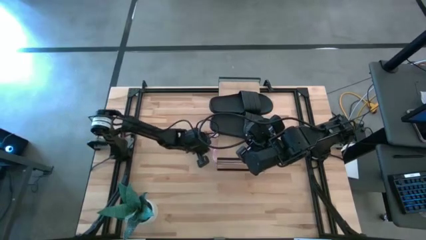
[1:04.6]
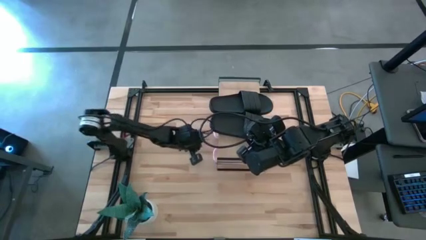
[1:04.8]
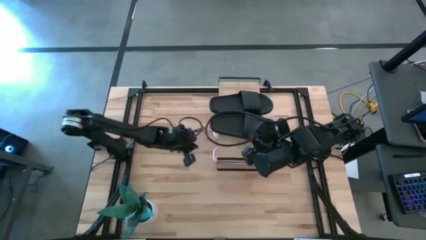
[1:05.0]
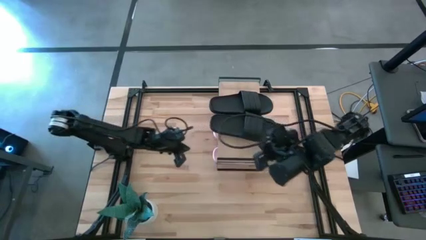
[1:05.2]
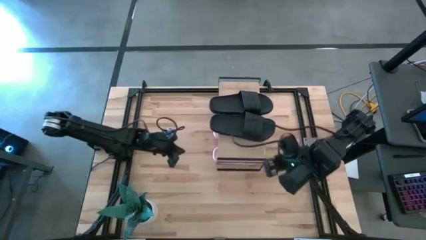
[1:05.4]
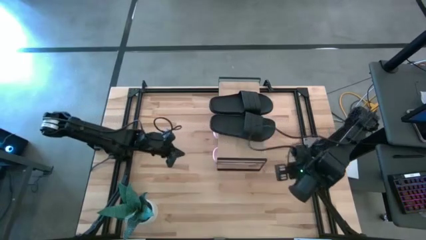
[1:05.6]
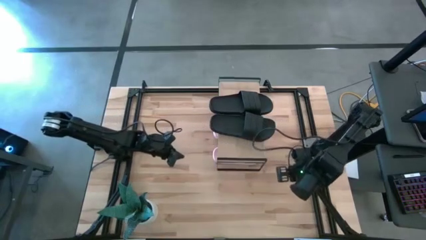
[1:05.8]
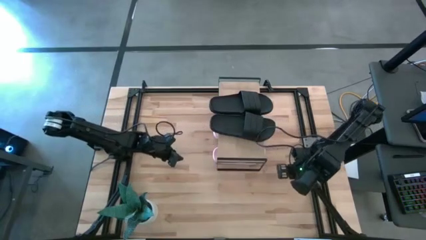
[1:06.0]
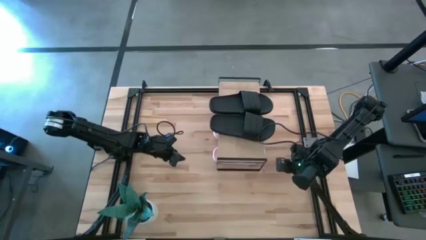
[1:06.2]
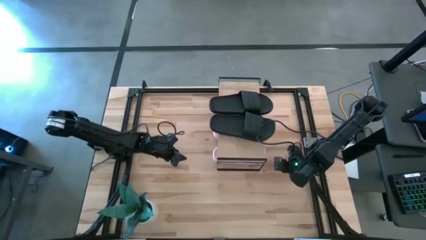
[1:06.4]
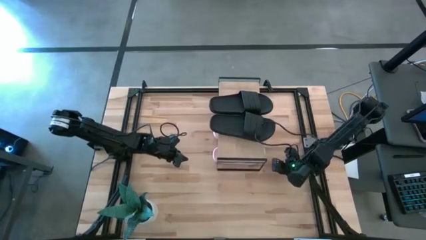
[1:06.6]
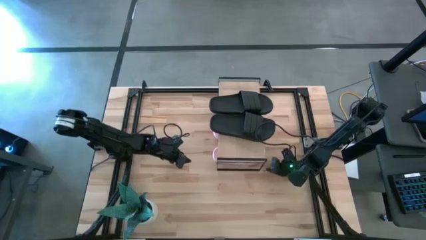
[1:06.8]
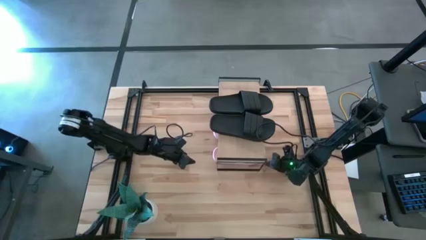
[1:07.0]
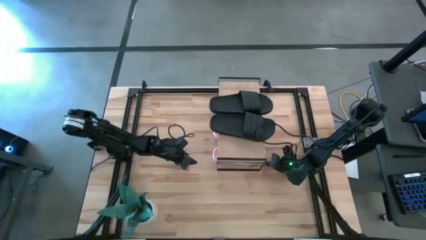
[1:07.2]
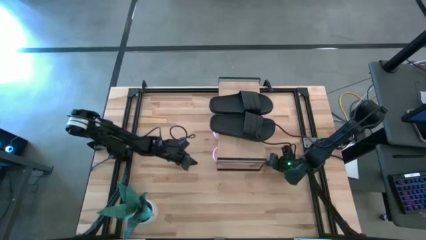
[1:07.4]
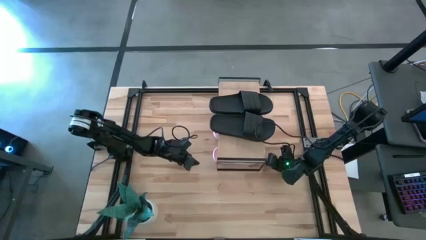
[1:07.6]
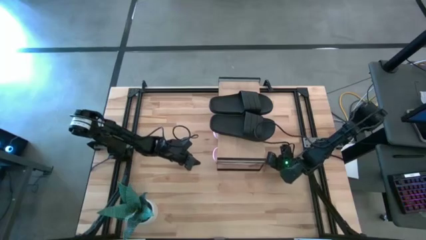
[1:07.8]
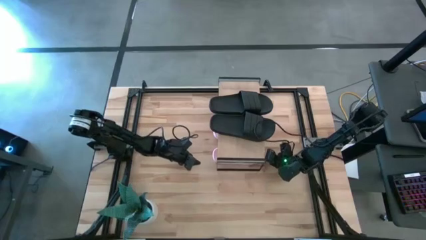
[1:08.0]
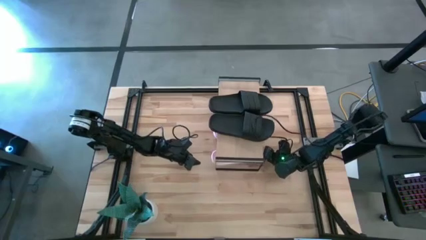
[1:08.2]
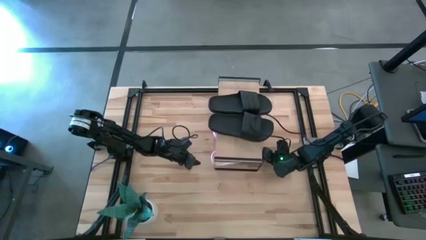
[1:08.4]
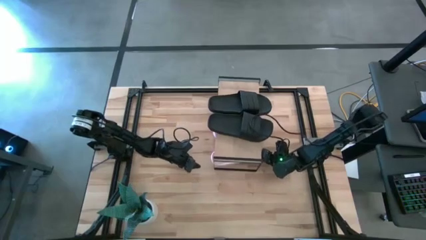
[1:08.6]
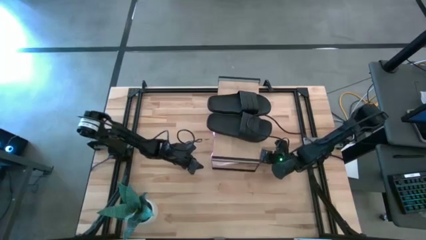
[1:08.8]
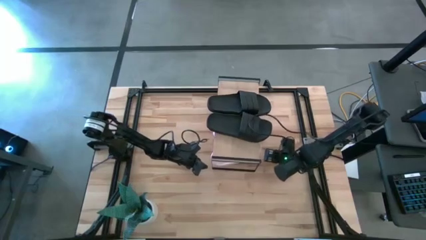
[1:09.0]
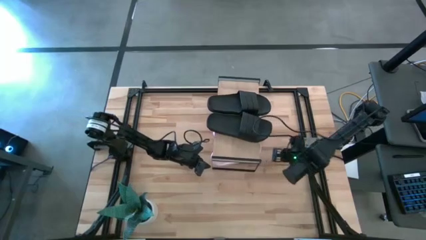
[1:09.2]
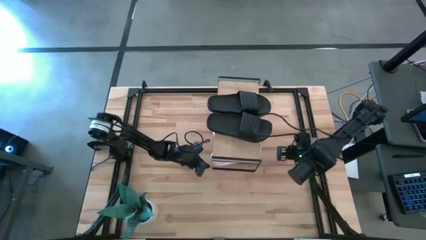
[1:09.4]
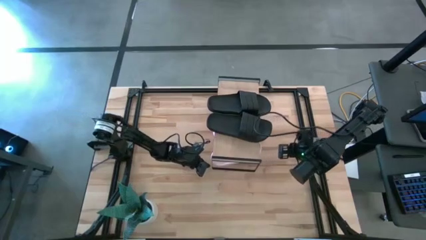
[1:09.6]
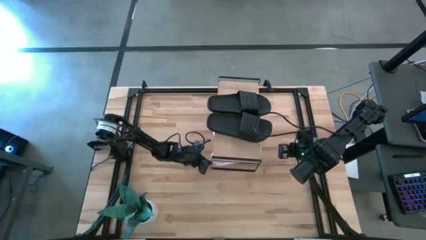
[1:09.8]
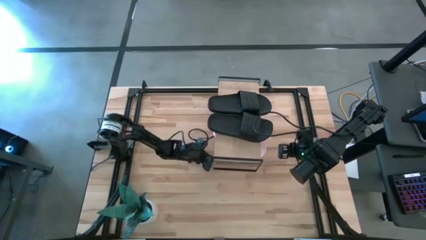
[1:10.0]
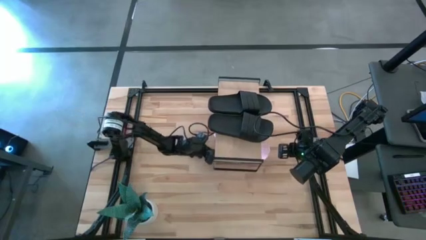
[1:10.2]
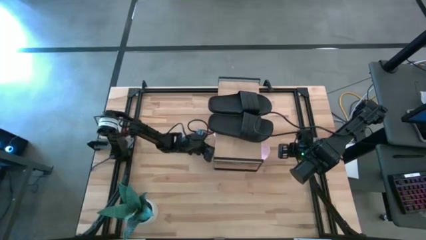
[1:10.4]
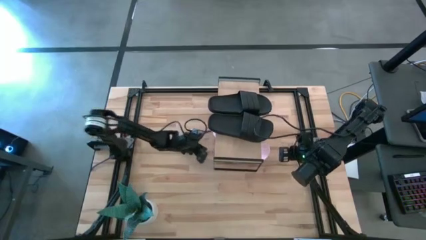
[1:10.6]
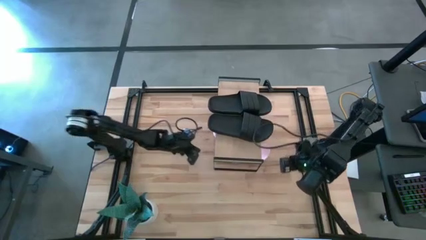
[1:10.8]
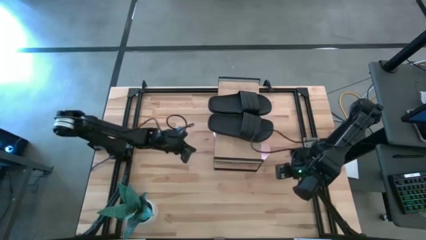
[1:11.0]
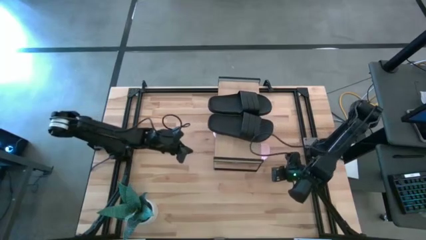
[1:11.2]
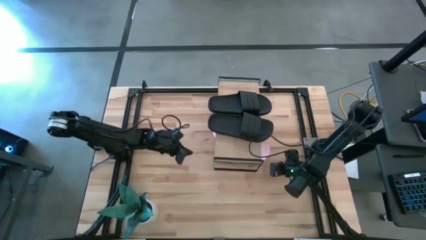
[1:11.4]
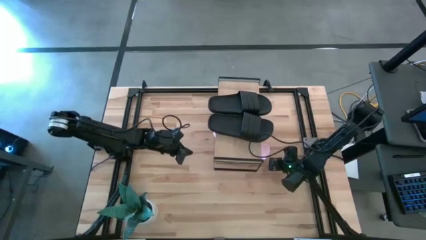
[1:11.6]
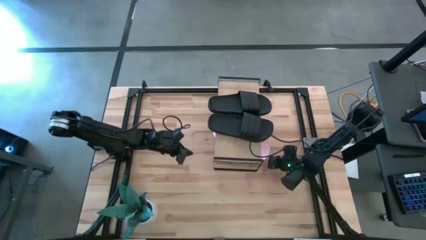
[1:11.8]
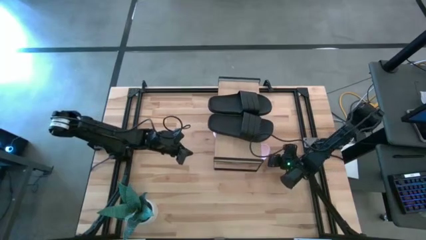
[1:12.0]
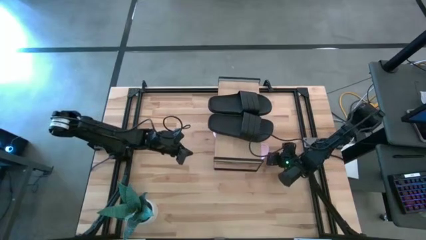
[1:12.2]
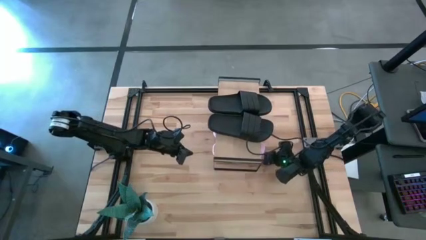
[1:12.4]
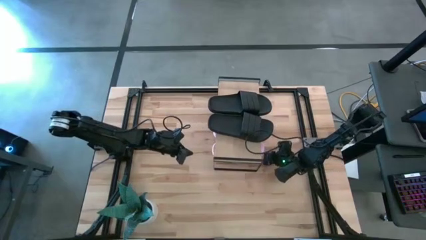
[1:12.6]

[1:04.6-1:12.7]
Task: Pick and place slides into the shelf
Adjust the pink slide under the shelf

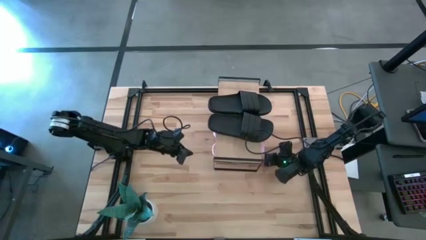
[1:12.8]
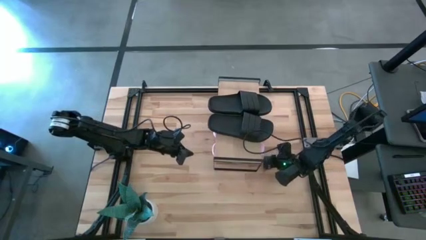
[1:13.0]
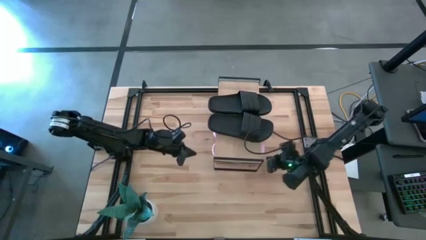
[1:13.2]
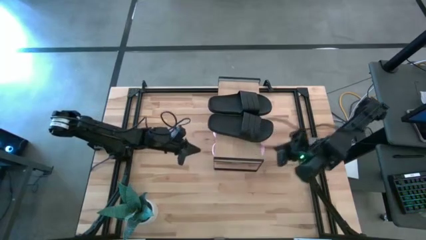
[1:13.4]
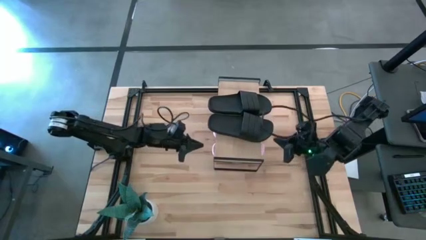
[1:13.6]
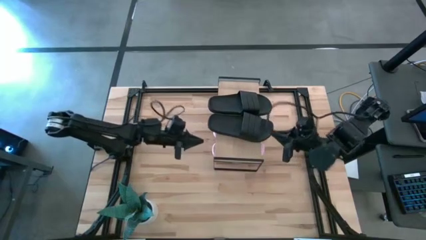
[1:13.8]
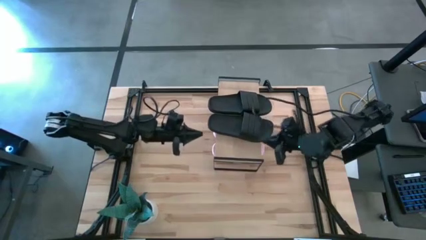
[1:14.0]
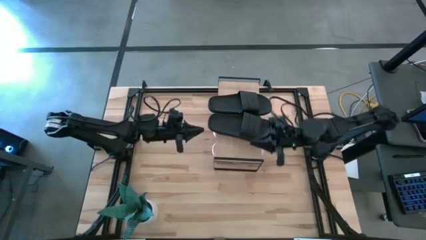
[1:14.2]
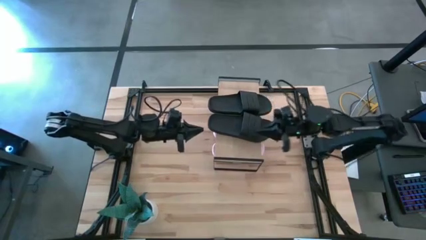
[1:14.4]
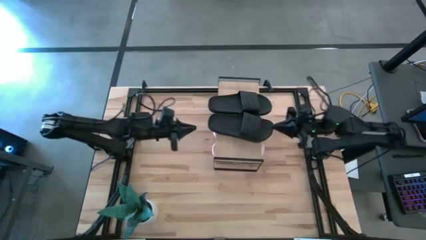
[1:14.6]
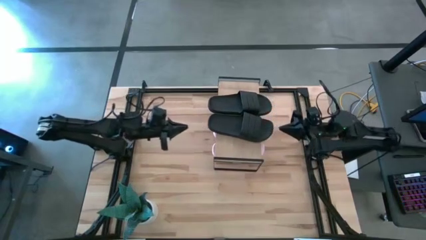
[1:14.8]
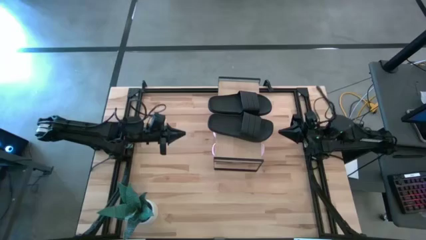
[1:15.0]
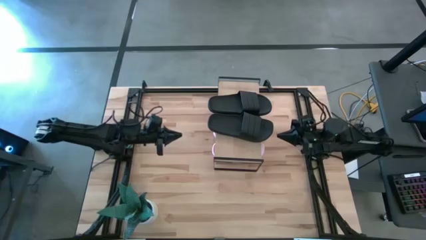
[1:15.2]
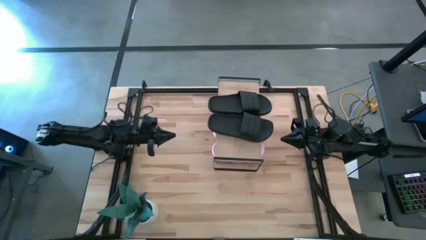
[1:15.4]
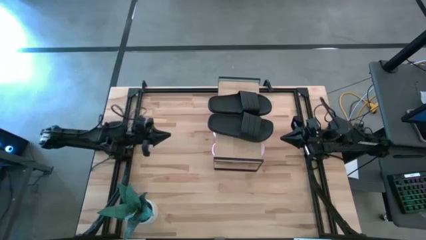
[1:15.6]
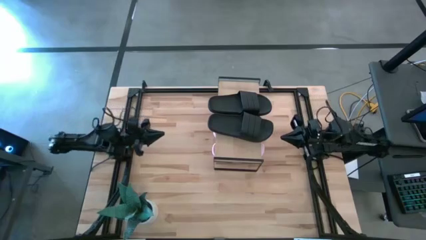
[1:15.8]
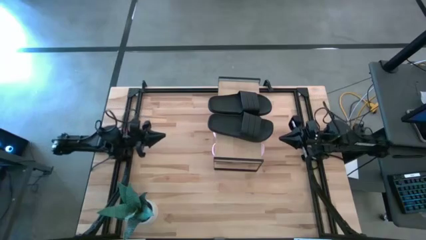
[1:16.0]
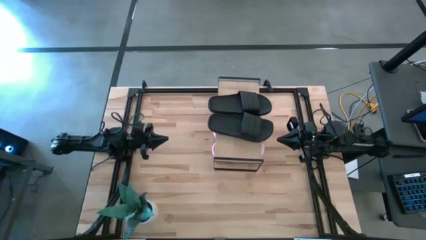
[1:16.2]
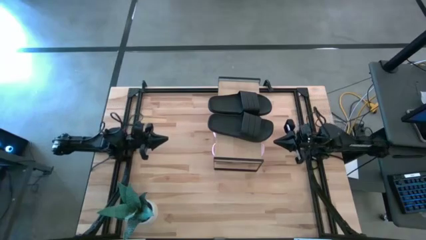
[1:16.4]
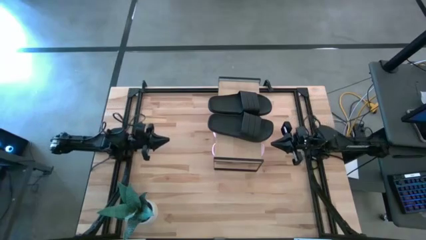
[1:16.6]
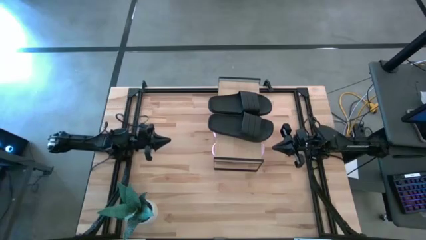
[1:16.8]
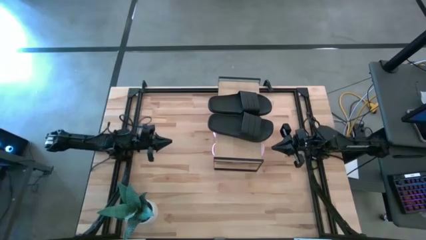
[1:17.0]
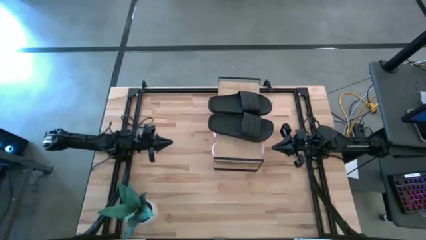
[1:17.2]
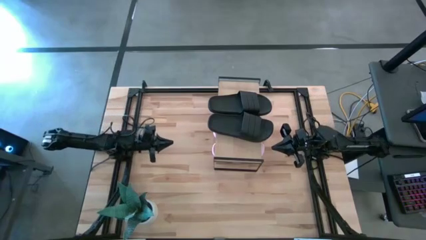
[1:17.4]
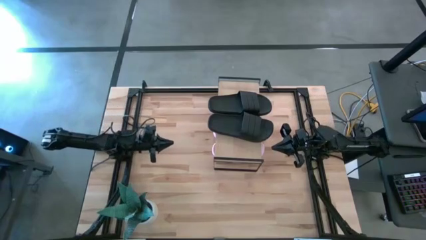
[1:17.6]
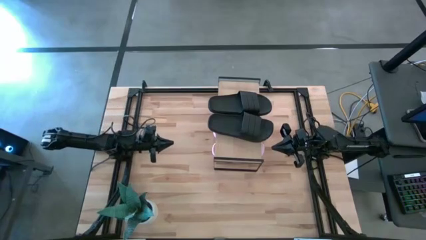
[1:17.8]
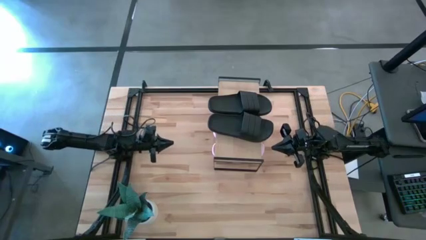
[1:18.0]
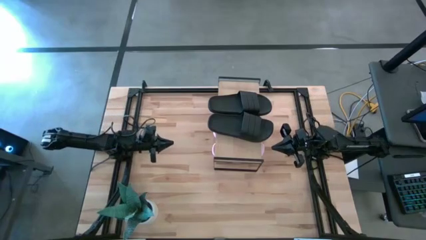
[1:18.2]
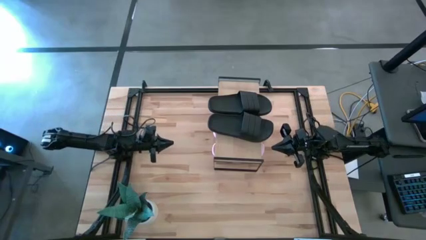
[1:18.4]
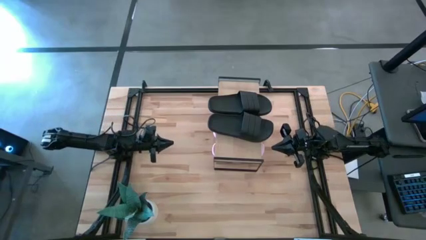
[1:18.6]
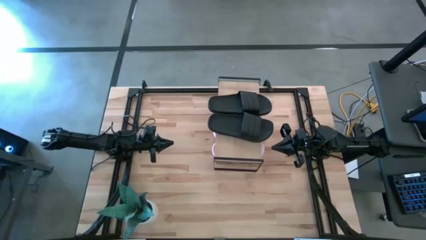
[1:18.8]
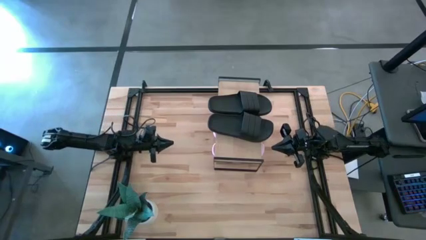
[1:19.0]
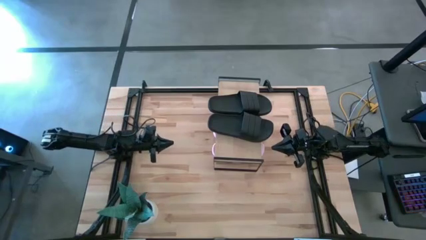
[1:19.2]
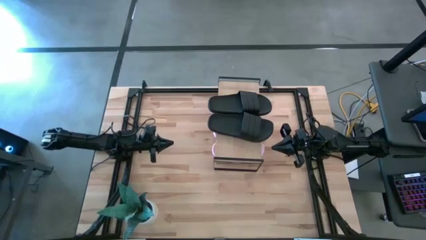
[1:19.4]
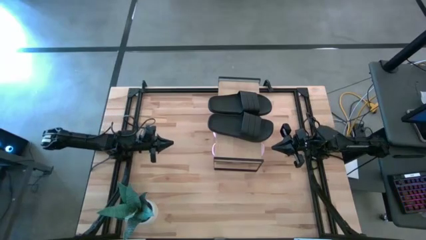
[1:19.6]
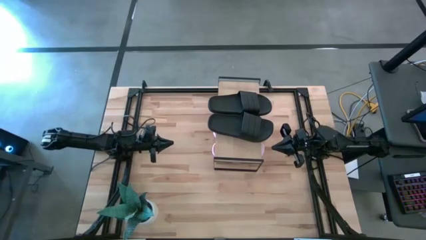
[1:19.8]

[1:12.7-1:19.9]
Return to Home Position

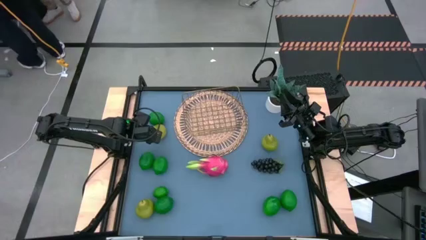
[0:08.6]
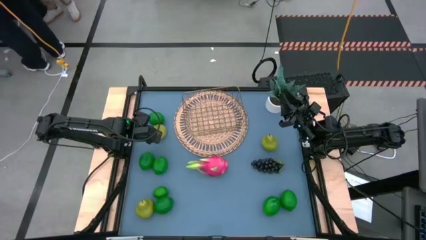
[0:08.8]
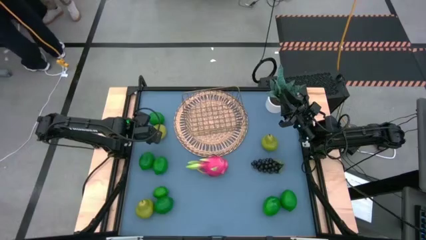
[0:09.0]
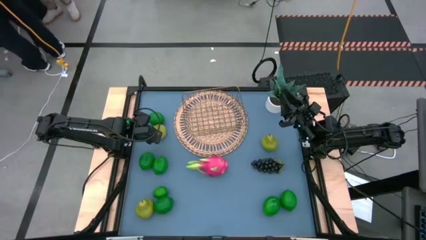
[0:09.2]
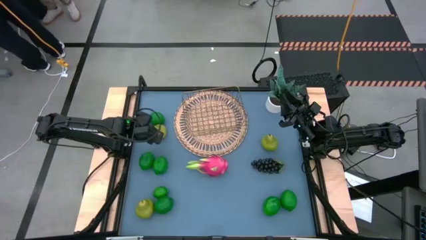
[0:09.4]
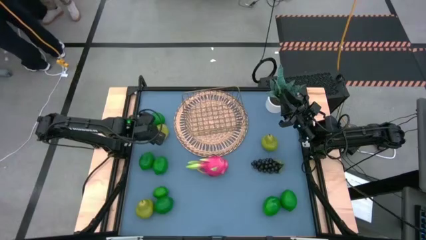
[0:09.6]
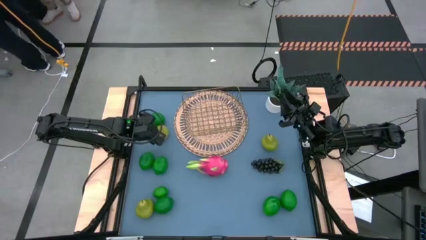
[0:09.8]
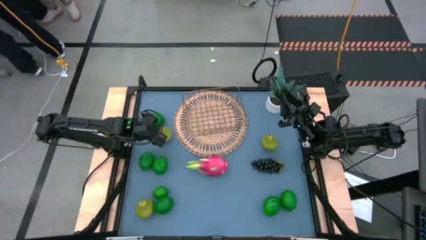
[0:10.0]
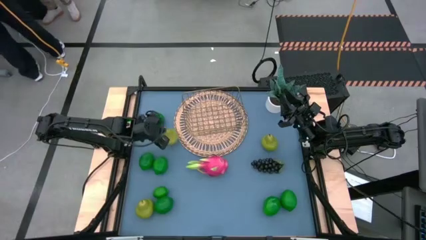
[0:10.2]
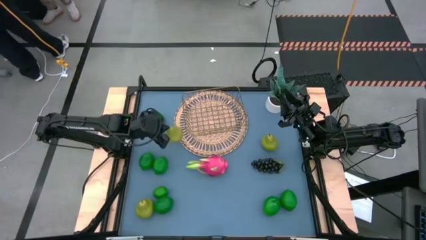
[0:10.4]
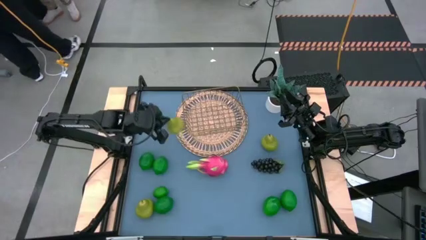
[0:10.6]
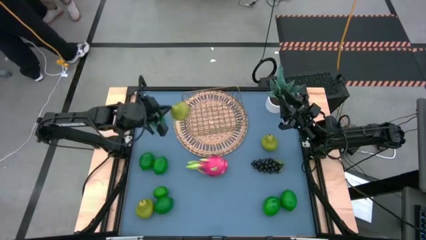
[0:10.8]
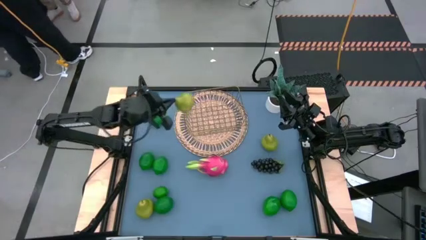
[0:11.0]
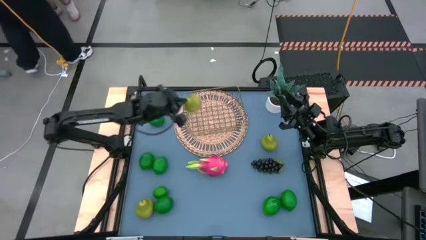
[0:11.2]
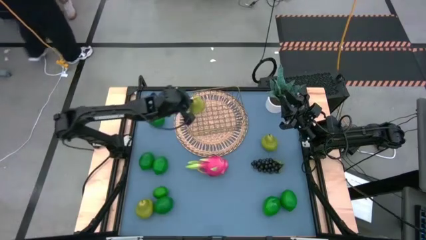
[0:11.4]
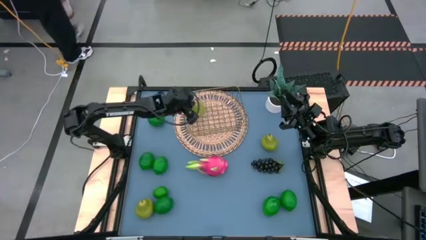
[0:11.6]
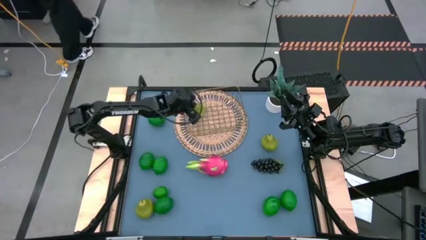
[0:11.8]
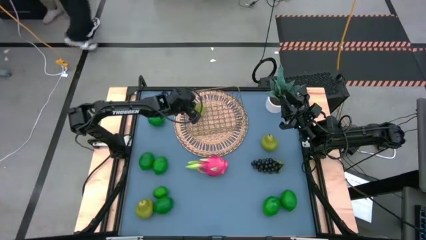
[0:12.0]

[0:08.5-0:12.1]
Task: Build produce basket
Put the green pear into the gold wire basket
